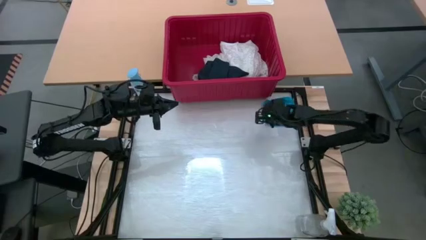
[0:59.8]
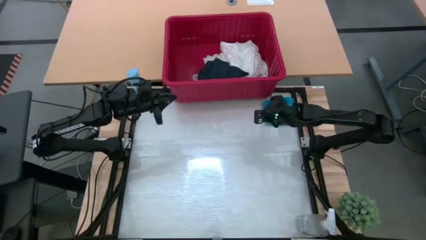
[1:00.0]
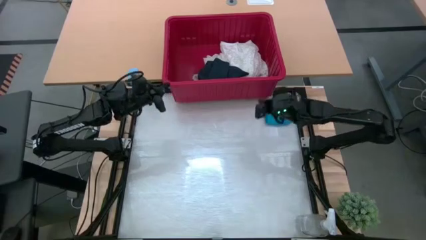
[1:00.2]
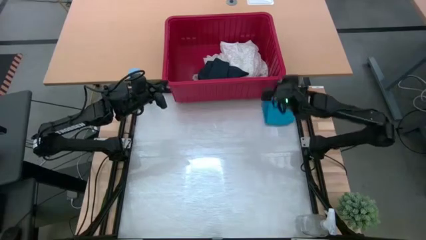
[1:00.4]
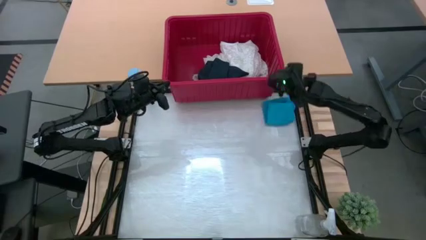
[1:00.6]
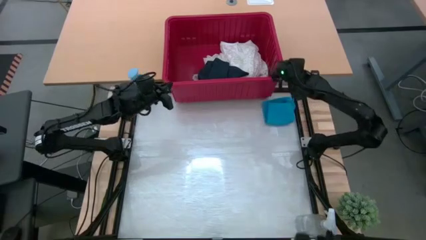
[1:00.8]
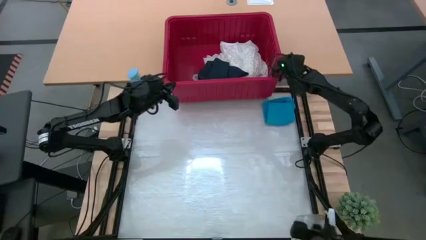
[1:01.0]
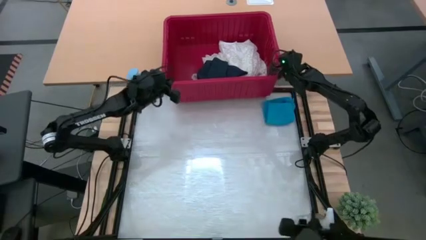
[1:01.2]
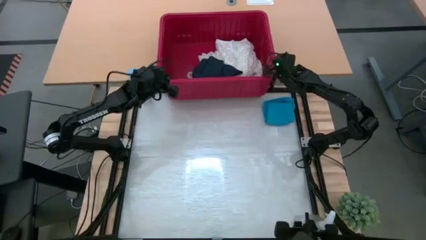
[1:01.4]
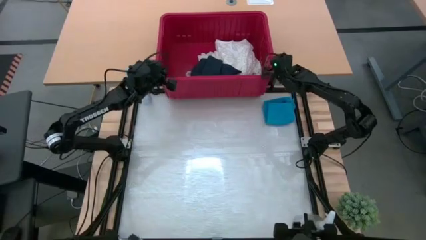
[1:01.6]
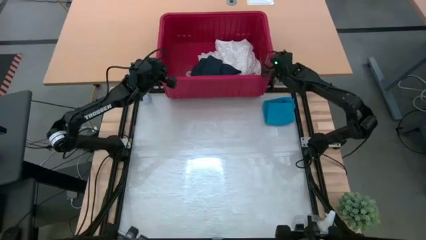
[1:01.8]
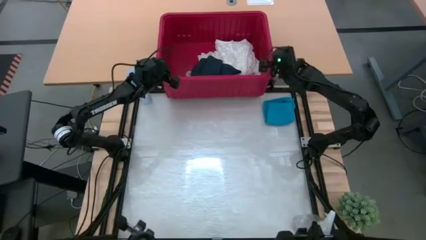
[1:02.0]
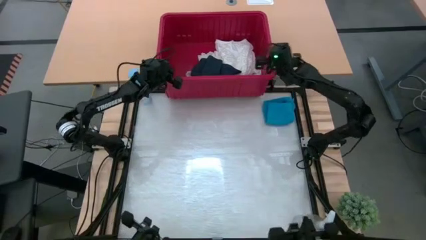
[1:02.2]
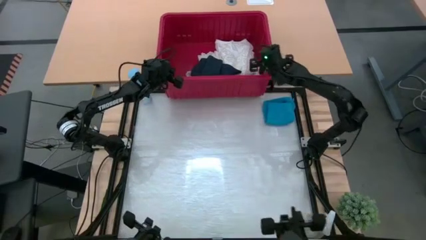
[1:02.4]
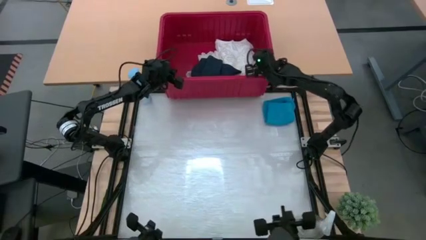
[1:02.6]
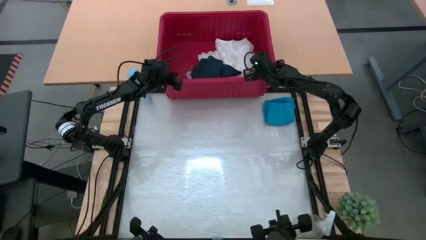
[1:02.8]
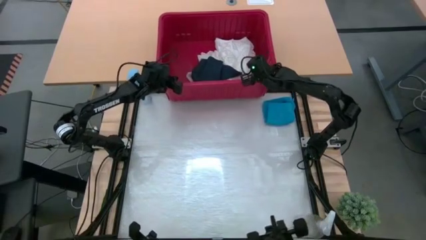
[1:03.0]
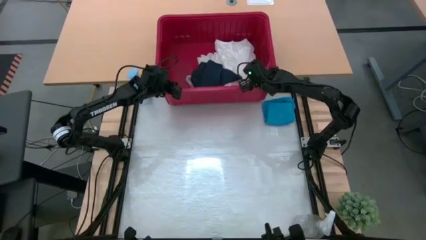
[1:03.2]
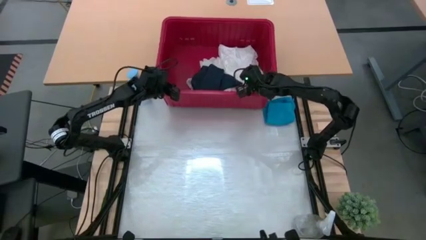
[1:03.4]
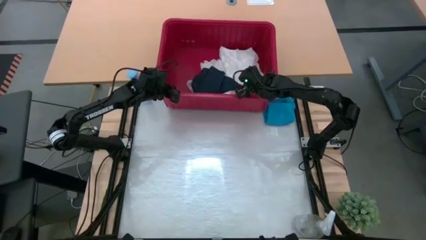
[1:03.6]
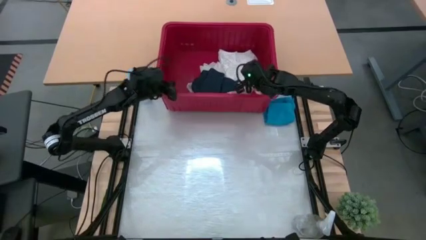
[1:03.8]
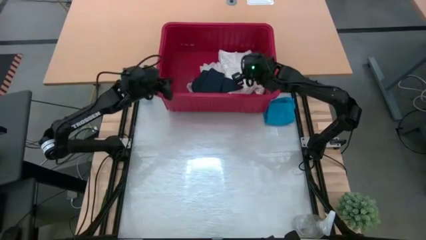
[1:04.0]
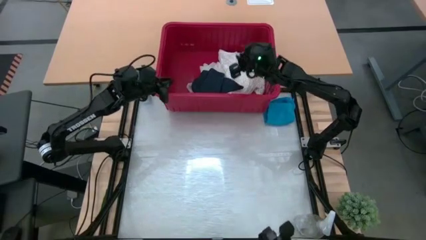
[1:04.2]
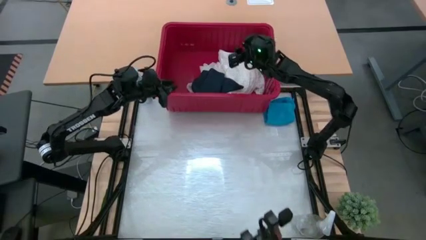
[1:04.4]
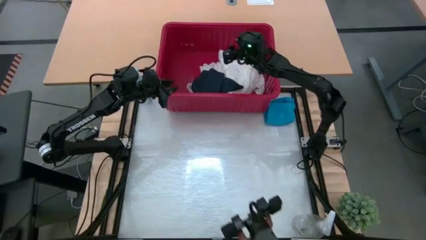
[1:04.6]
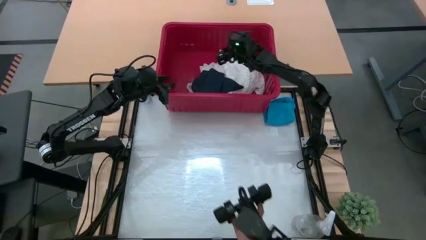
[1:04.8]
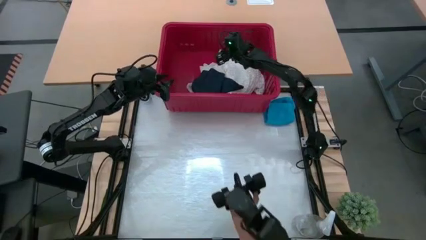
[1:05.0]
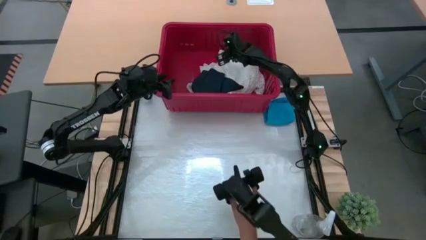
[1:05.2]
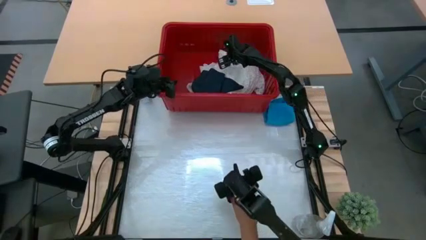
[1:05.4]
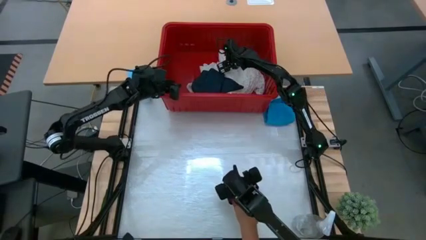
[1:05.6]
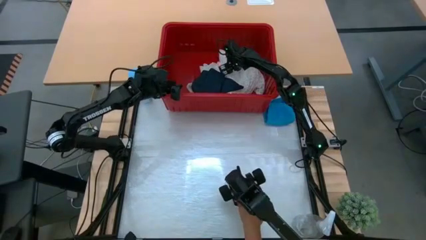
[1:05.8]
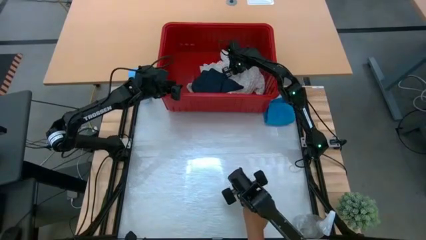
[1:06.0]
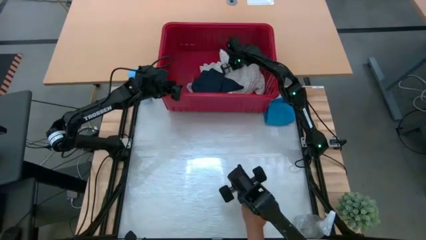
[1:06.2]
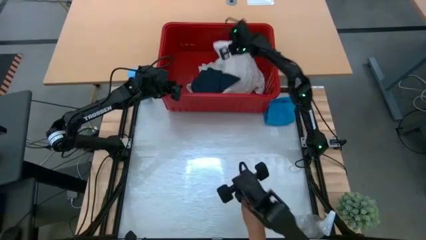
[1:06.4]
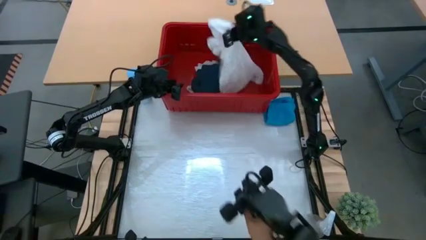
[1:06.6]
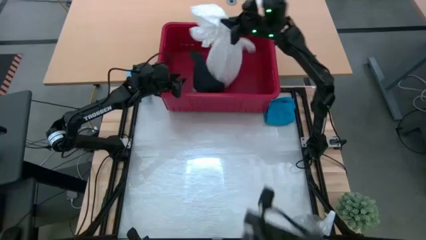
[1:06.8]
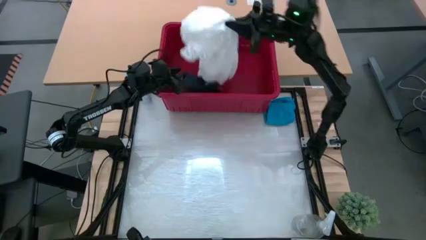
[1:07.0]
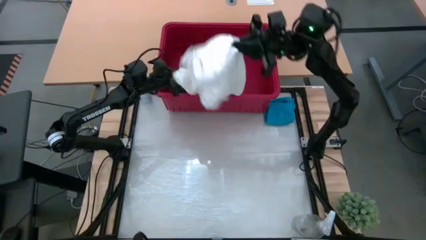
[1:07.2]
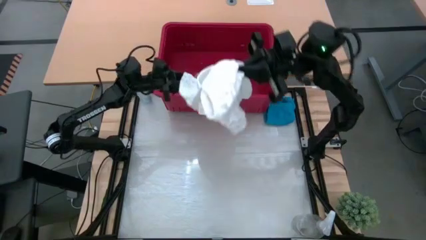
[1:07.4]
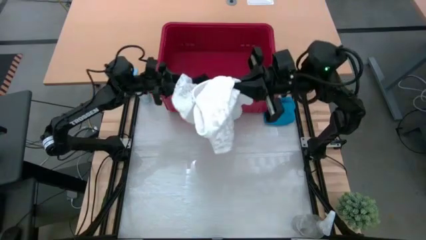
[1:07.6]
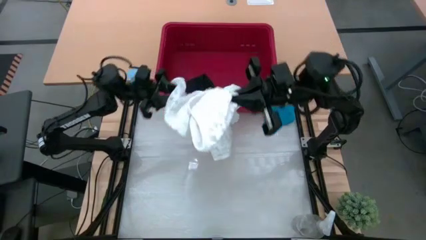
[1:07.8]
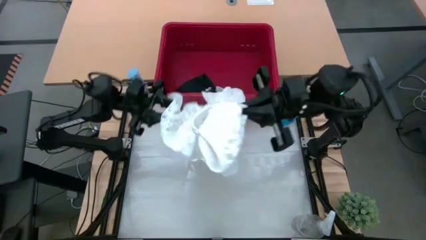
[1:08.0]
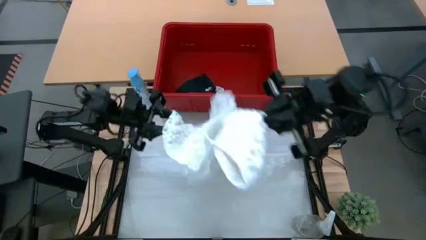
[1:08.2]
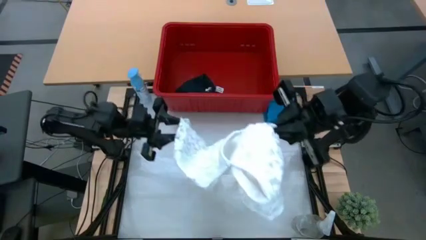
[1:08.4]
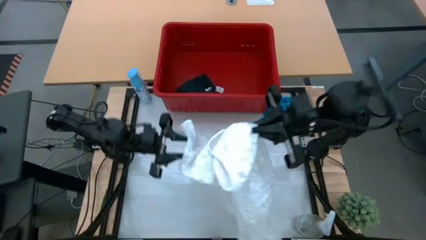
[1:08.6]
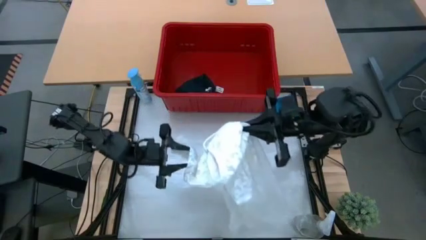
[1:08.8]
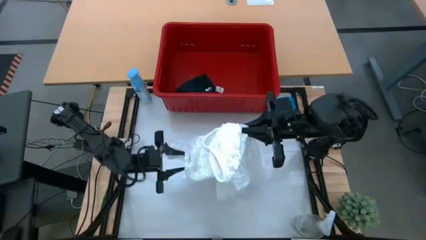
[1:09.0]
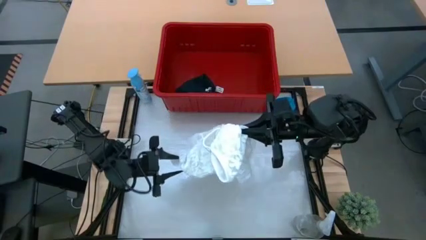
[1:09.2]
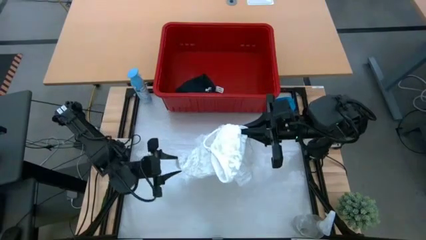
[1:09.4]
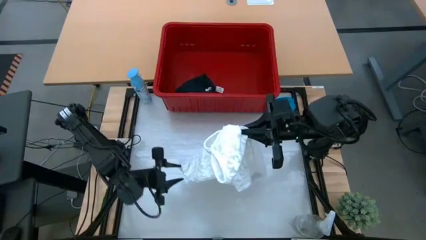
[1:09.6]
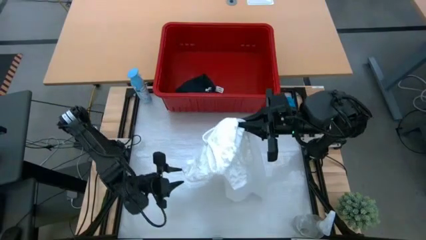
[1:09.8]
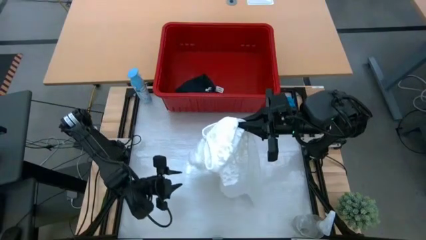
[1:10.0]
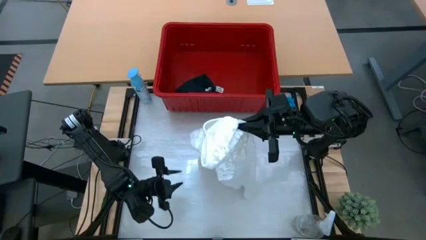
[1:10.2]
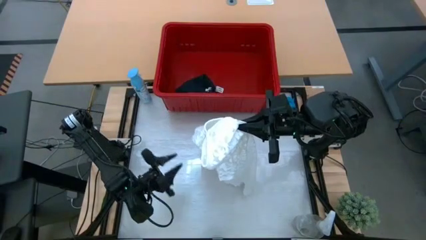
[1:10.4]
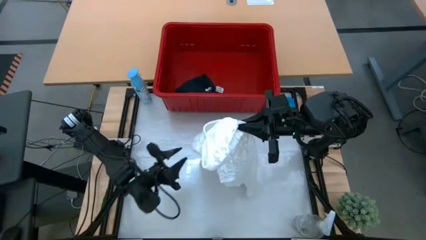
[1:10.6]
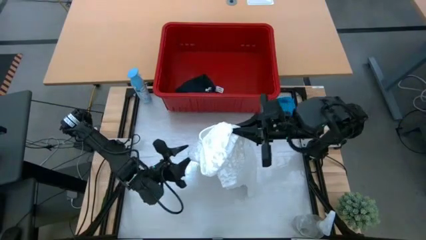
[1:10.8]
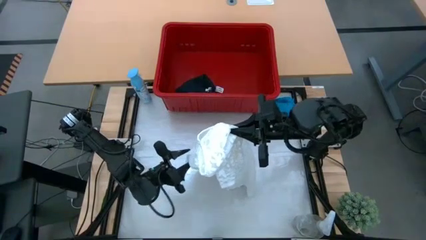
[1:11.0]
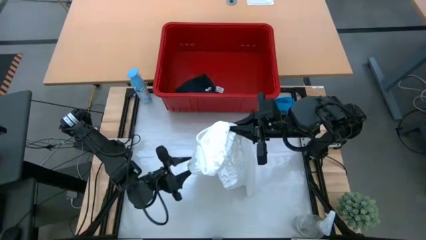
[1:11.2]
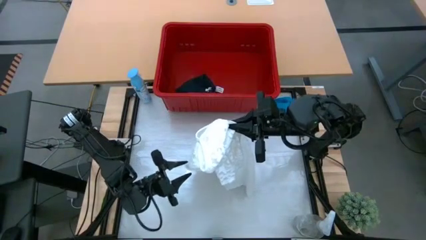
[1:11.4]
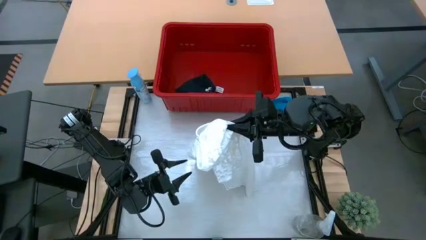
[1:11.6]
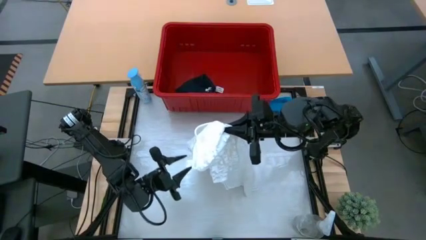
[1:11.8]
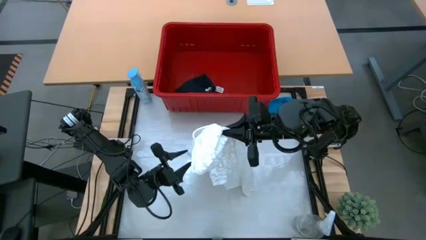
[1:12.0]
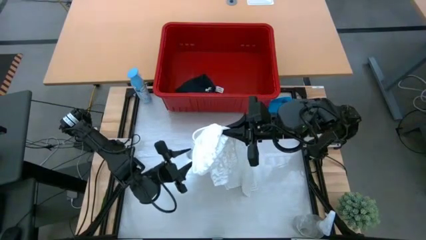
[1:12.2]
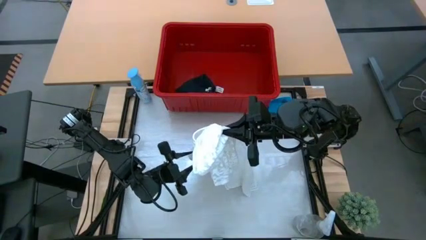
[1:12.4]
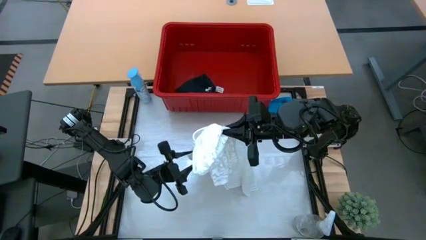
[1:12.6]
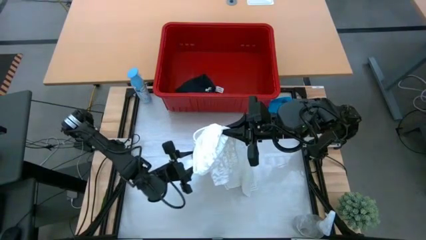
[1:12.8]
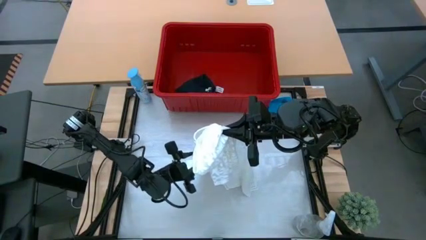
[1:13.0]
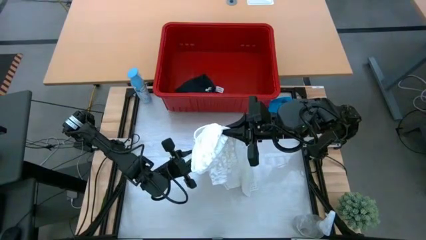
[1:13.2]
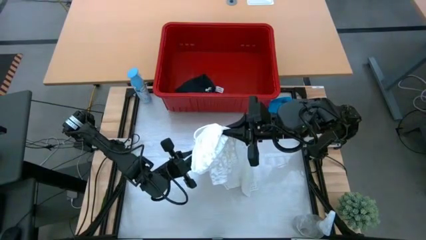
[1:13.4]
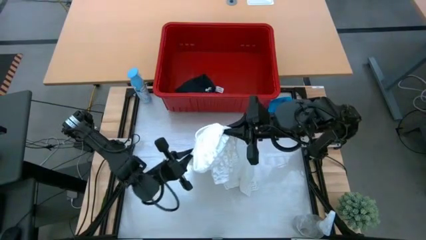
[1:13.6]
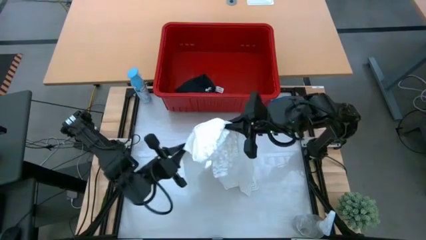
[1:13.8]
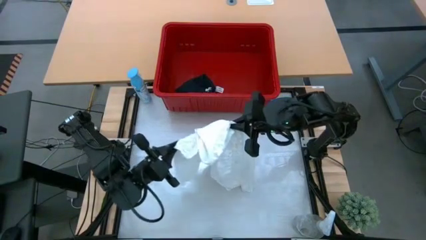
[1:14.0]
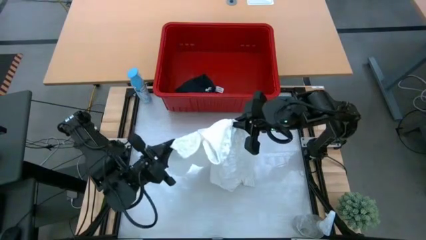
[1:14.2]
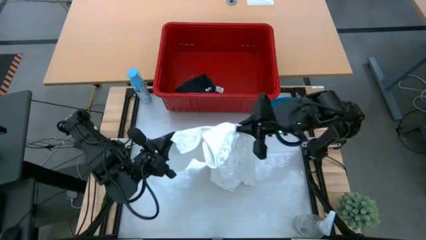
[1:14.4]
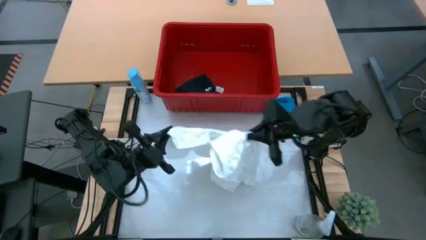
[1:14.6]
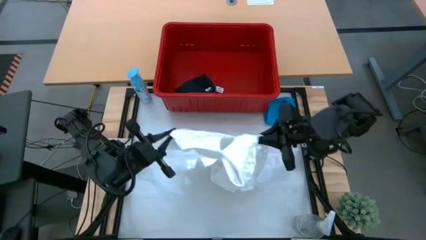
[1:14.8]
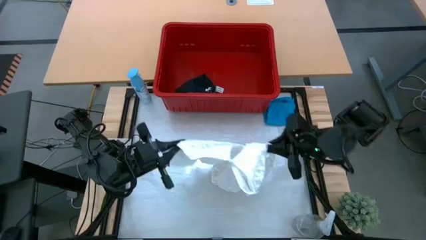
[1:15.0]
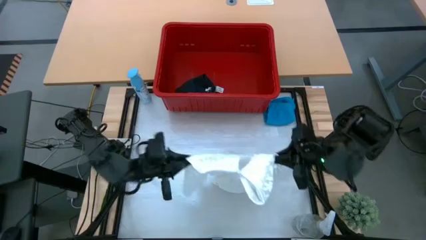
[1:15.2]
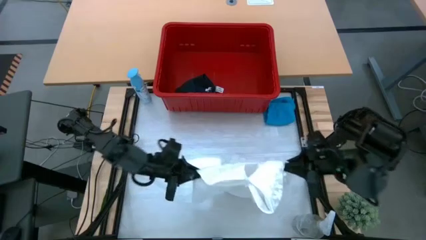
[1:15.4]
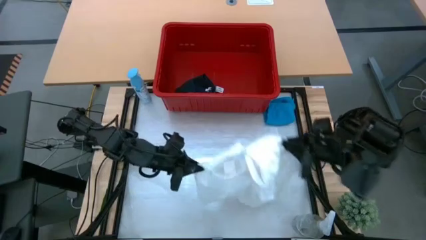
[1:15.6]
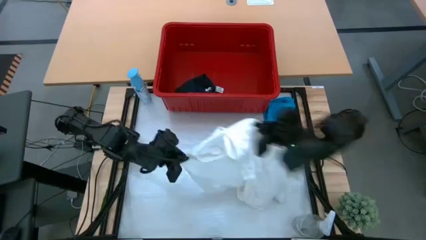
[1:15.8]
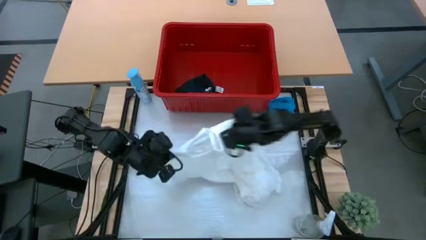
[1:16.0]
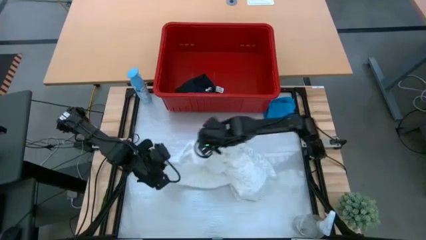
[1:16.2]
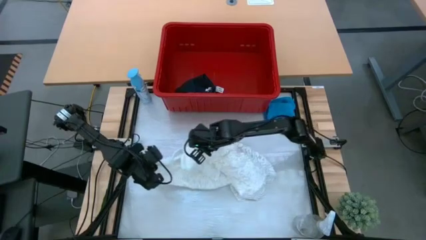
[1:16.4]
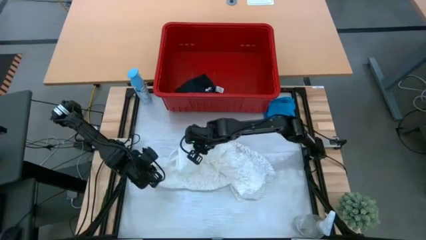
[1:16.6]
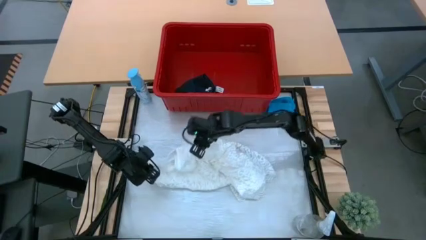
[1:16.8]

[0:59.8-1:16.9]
Task: Fold laundry
Remove the white blouse from the red laundry bin
